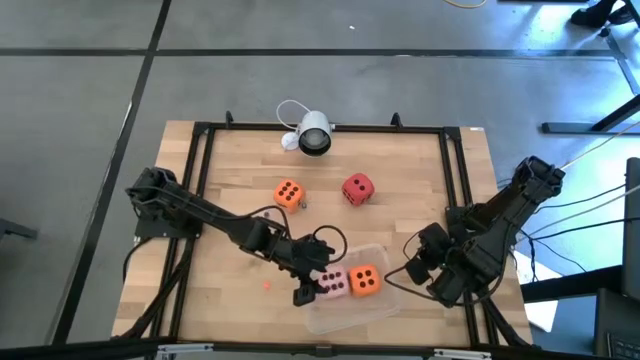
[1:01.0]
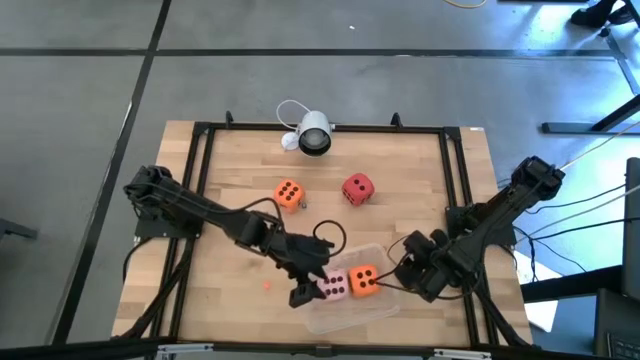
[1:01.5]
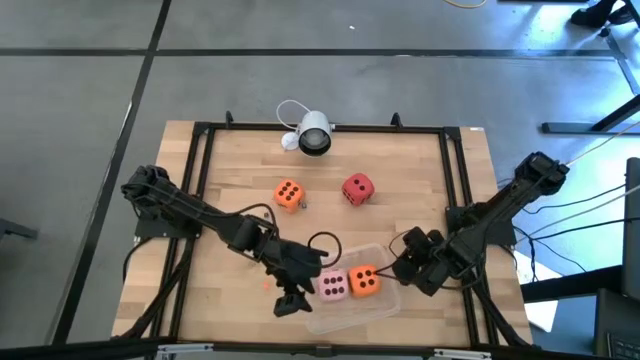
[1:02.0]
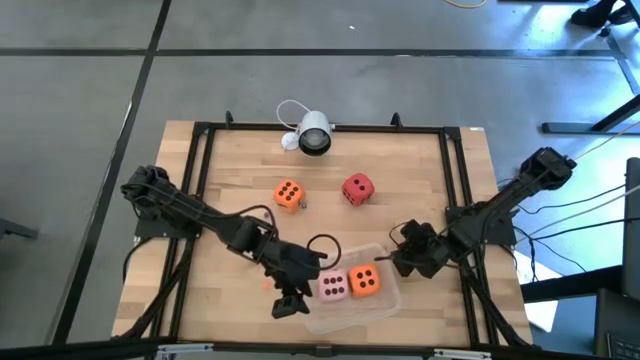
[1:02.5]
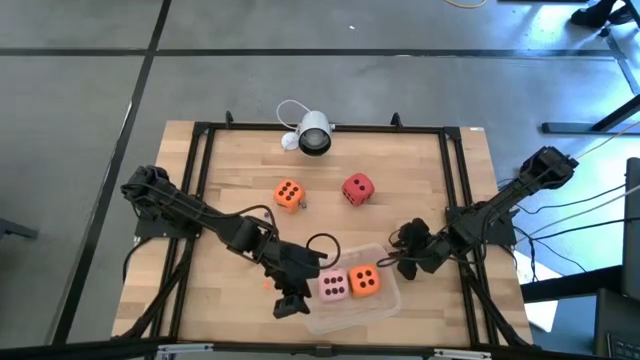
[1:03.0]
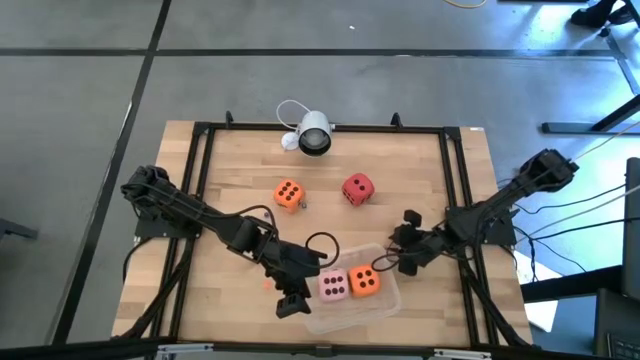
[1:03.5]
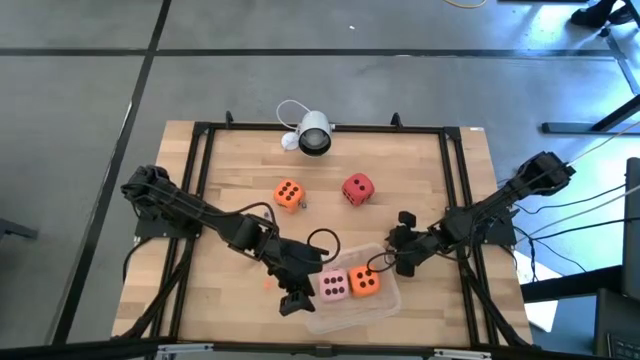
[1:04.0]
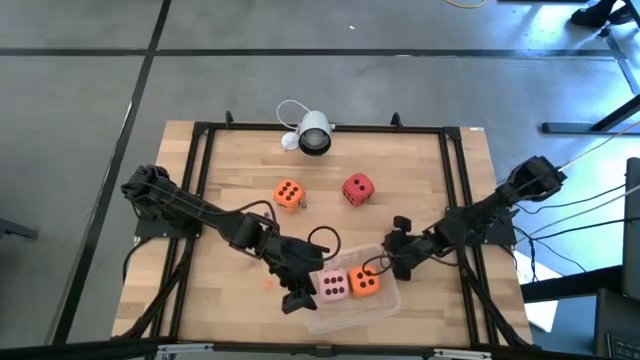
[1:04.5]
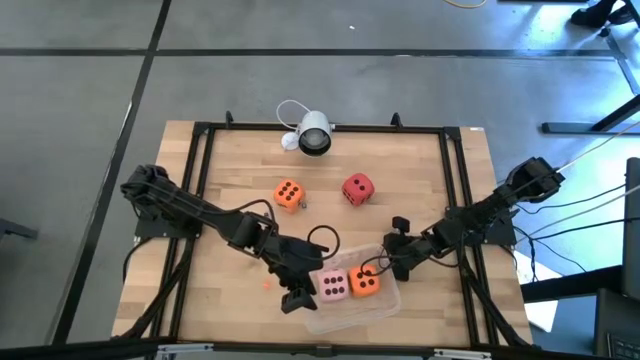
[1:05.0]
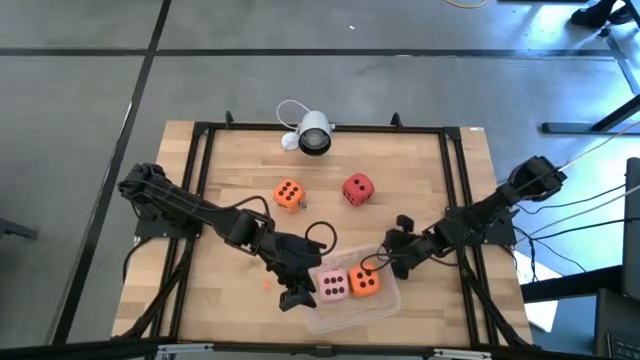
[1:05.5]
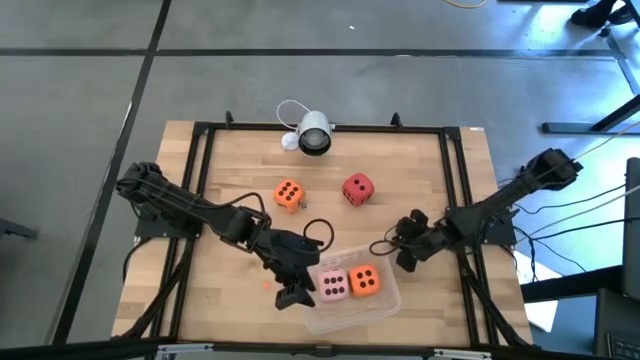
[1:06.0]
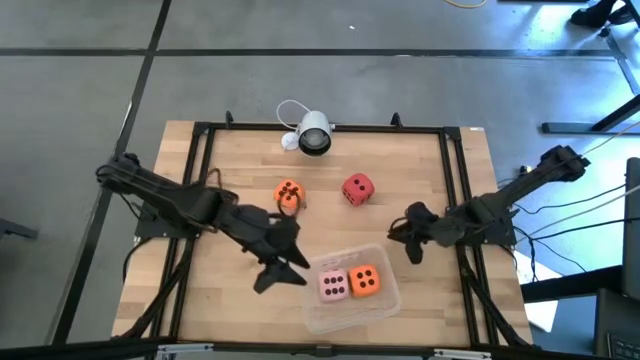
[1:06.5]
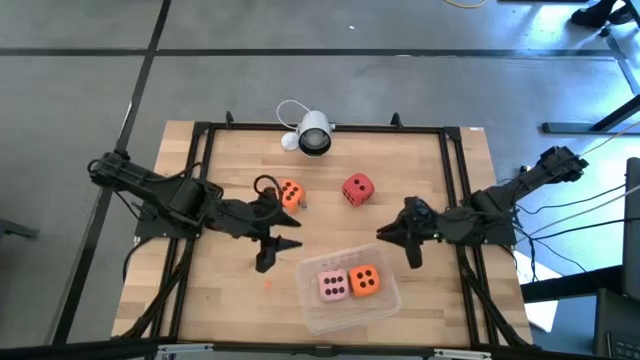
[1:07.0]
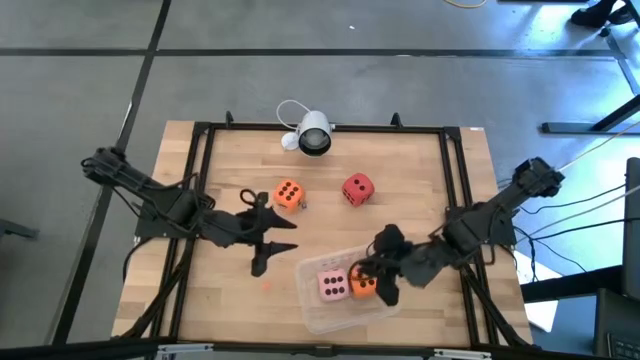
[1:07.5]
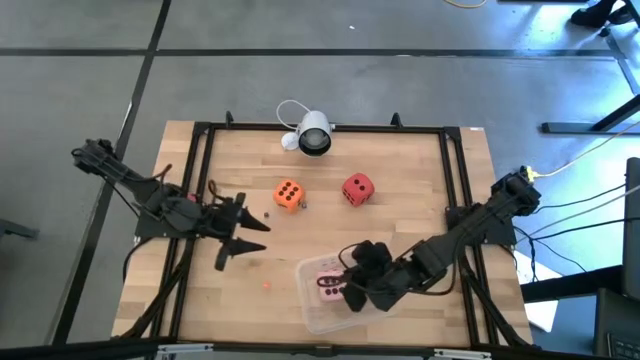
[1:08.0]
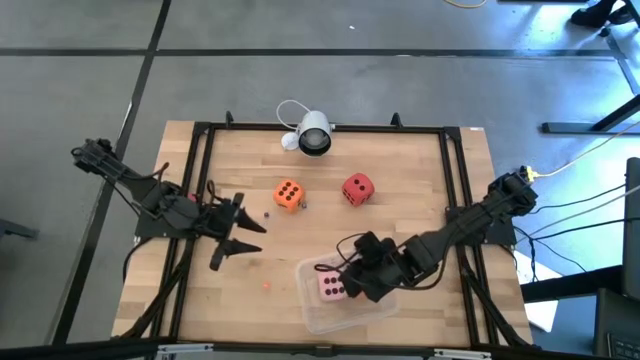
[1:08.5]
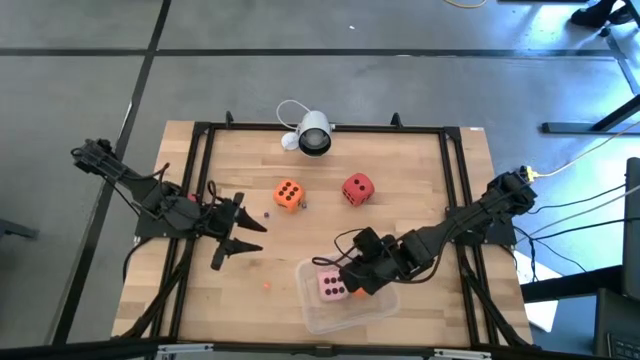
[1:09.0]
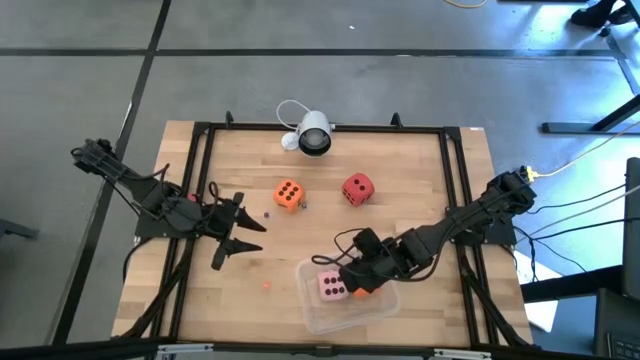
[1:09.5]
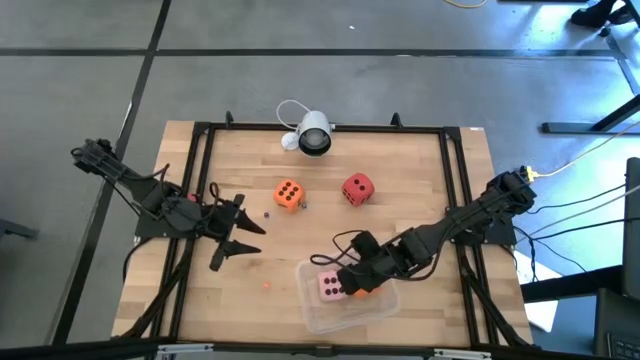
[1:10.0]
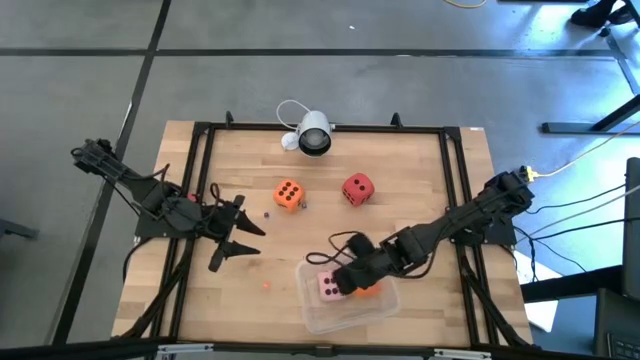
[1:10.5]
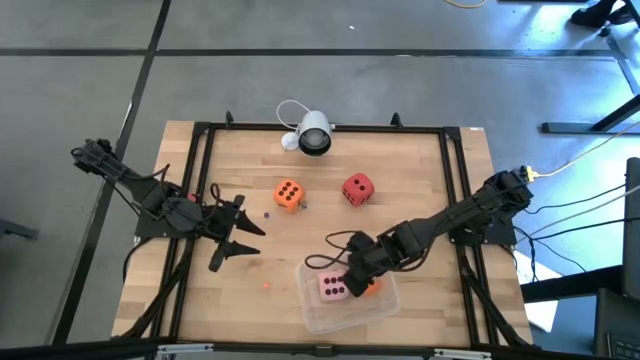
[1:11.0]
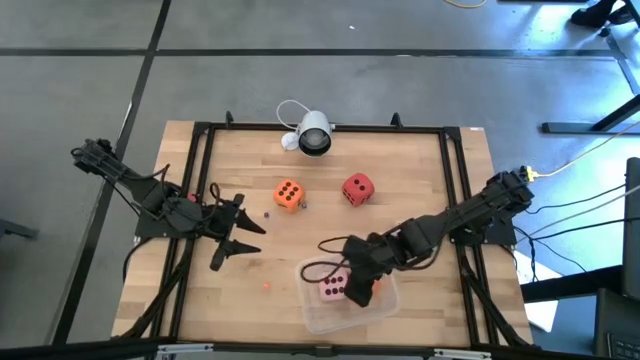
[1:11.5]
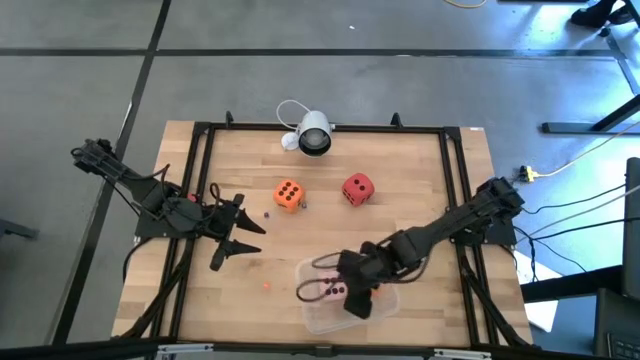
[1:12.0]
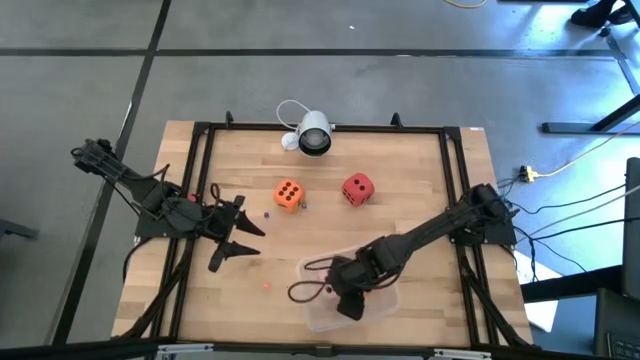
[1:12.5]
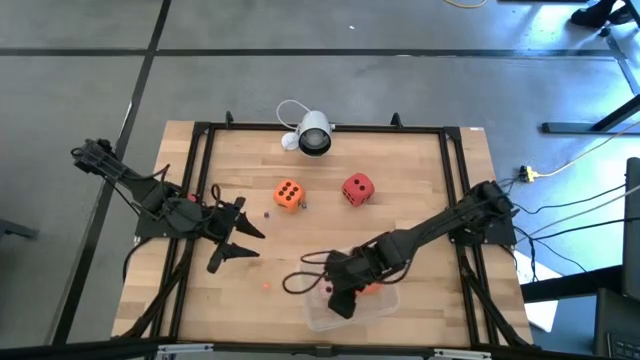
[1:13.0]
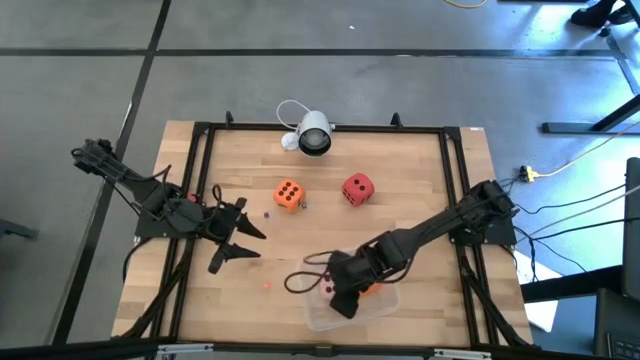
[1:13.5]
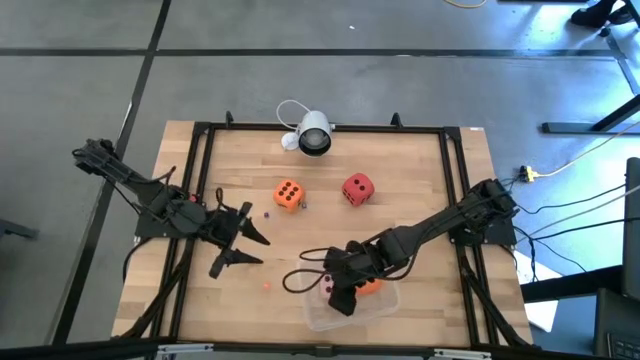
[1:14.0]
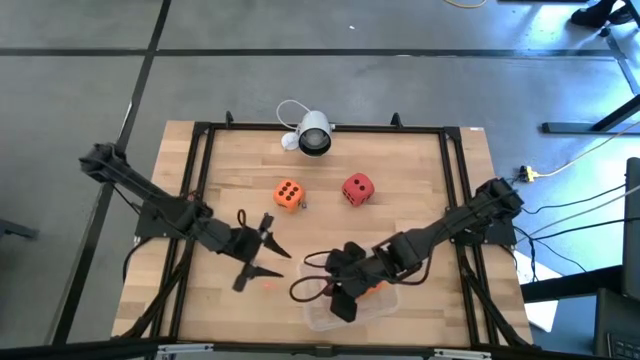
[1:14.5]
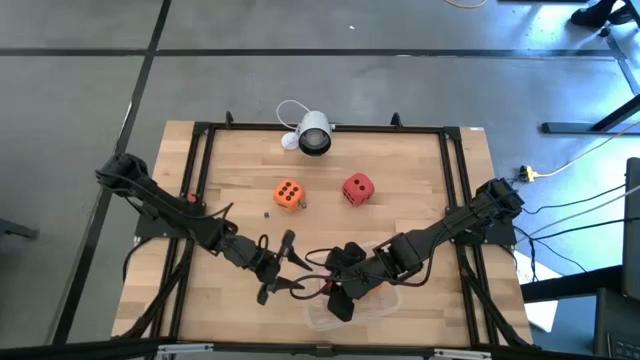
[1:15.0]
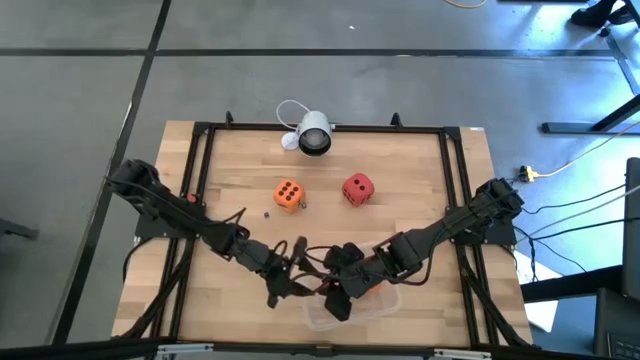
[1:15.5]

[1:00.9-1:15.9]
Task: Pick & Place Dice
Put the small red die into the transparent bin

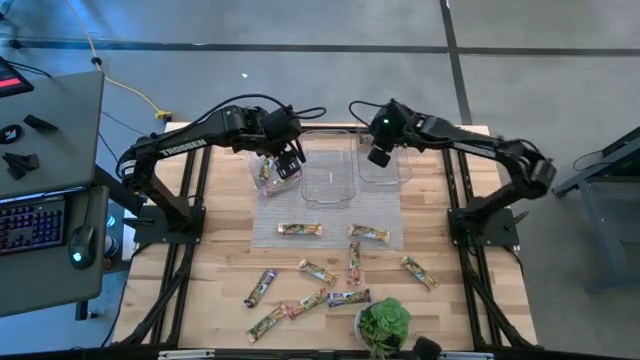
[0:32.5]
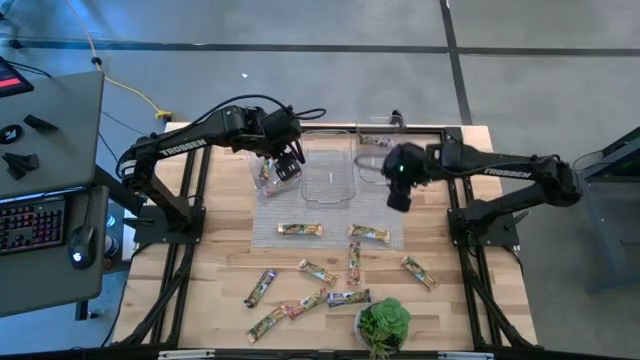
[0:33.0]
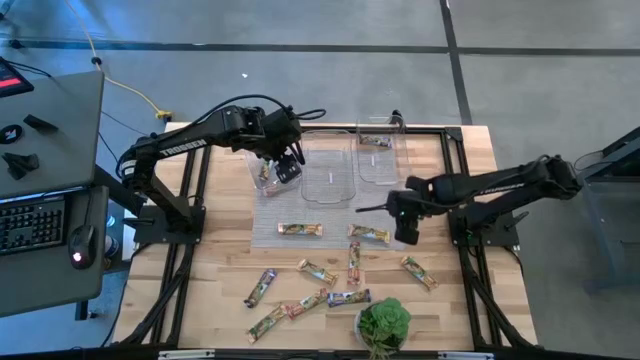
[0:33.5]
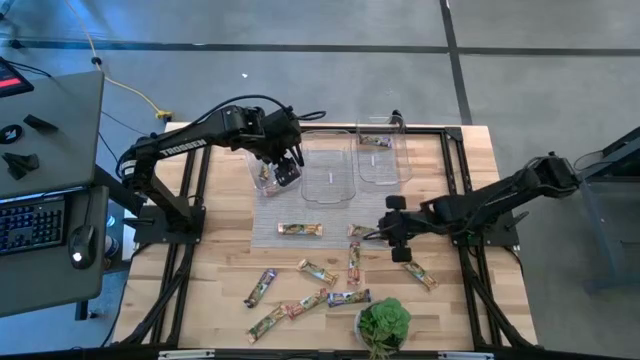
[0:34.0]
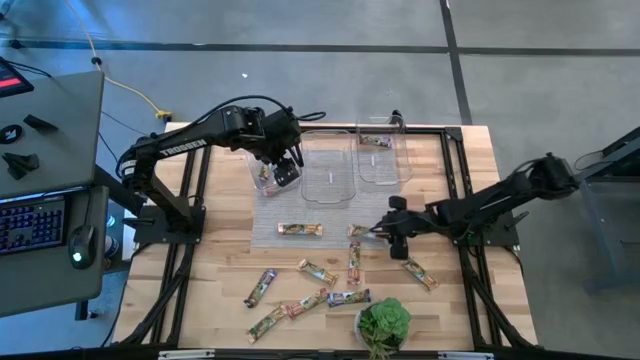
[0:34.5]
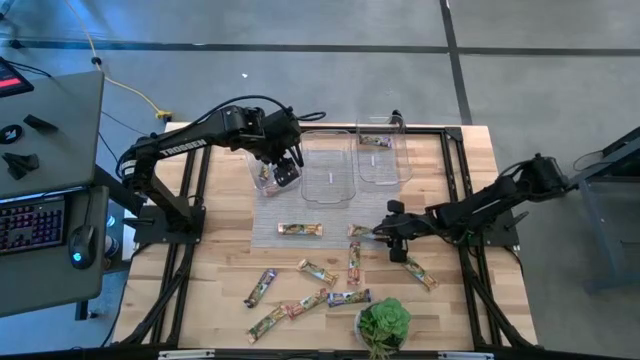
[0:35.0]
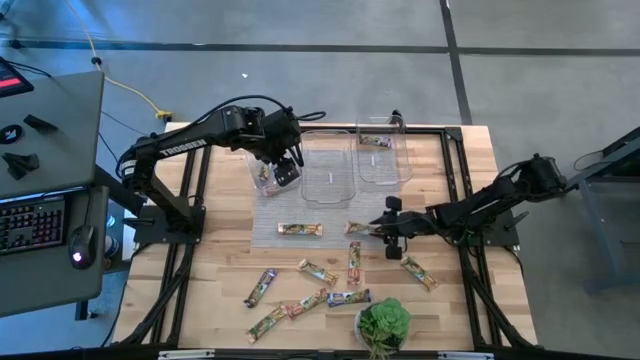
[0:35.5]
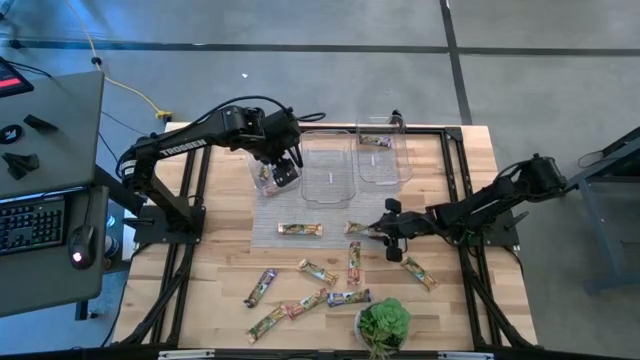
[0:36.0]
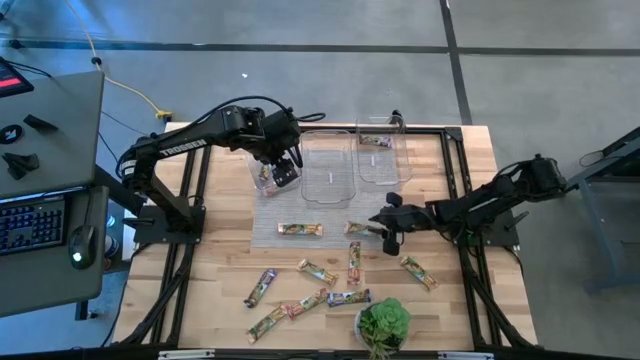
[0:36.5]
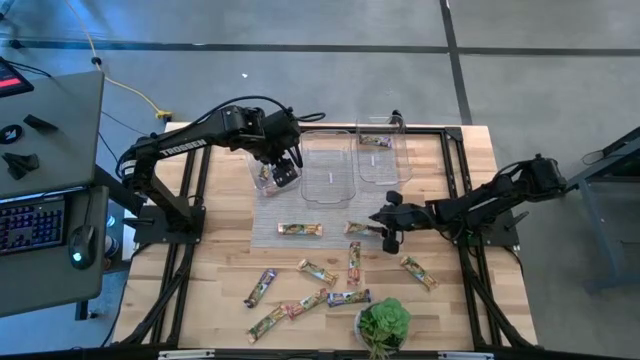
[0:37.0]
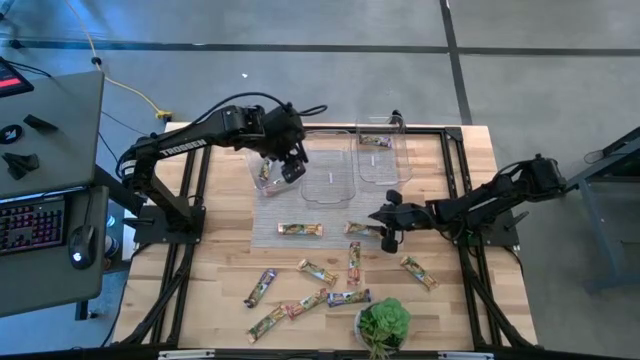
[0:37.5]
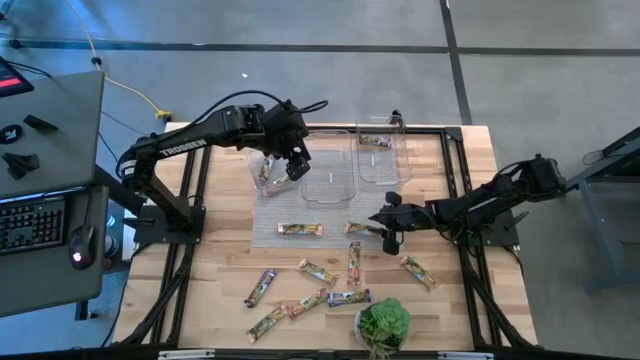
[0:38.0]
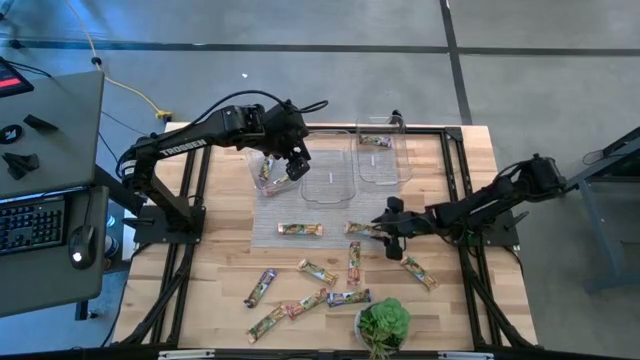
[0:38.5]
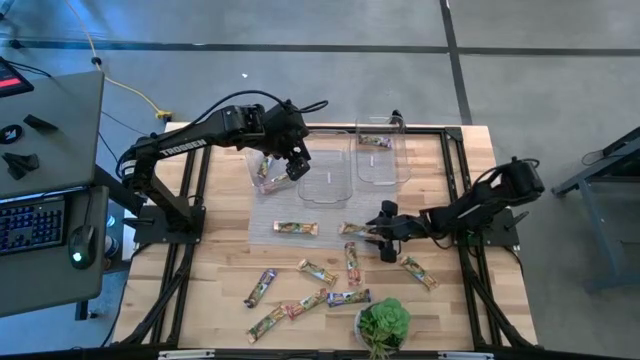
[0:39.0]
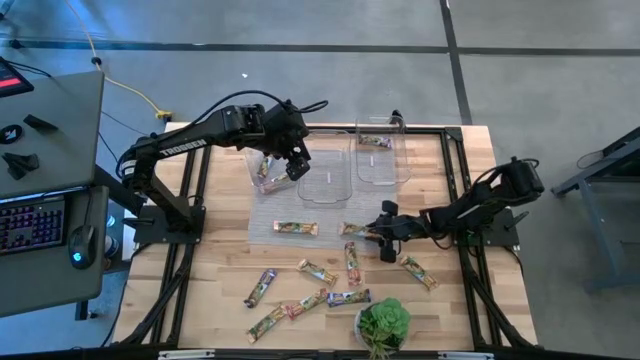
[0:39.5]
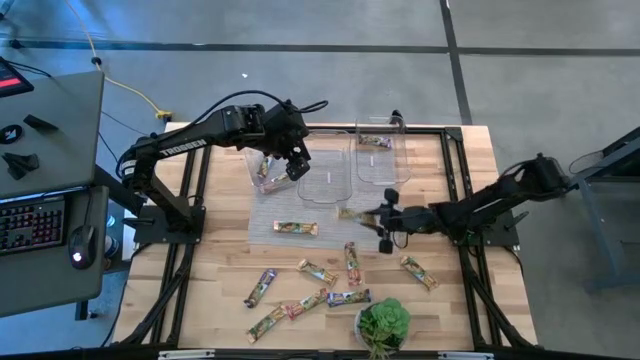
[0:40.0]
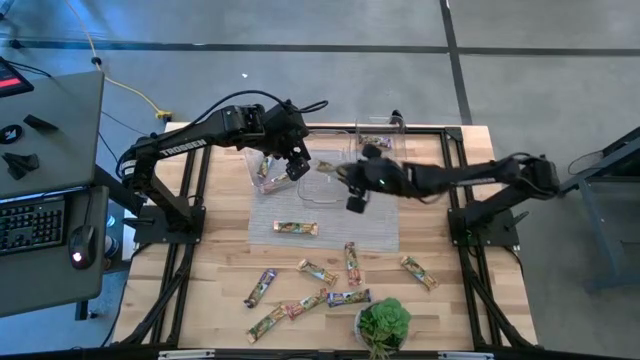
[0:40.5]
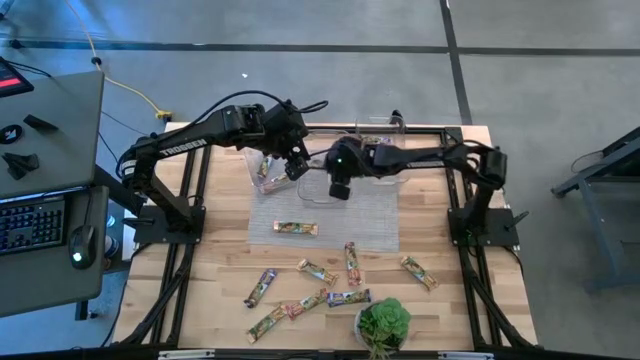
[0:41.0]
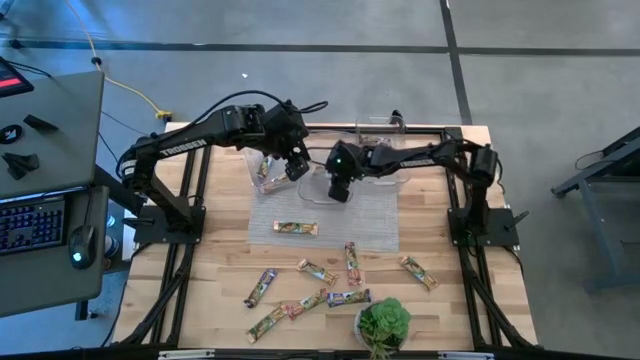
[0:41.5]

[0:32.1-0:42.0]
Task: Pick and place Granola Bars by type
Put the orange granola bar into the middle transparent bin
